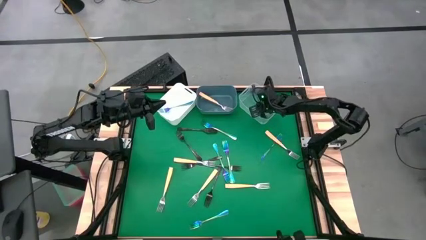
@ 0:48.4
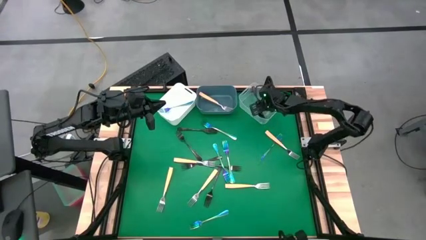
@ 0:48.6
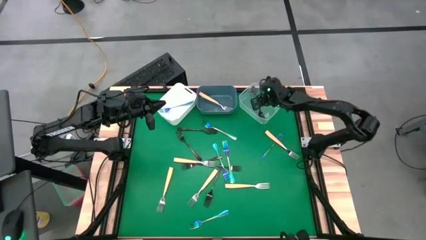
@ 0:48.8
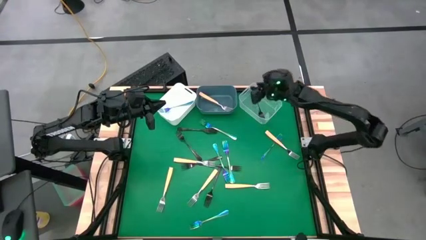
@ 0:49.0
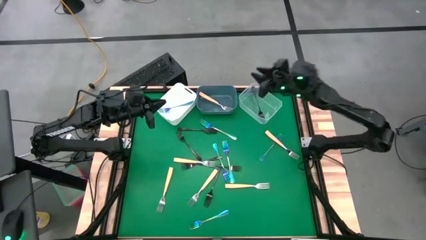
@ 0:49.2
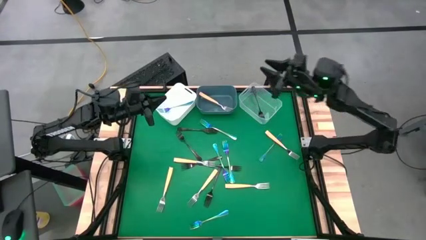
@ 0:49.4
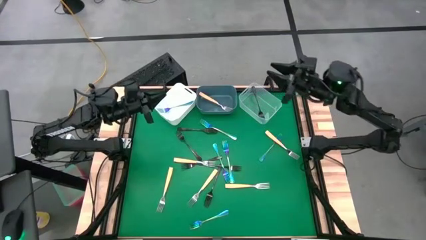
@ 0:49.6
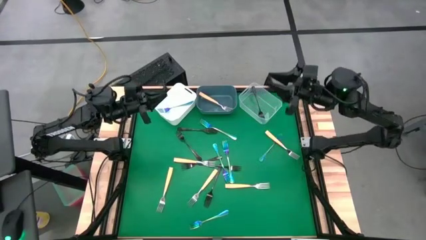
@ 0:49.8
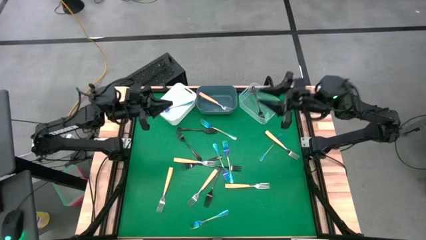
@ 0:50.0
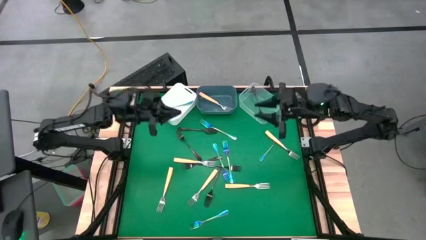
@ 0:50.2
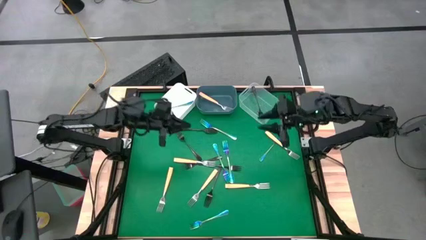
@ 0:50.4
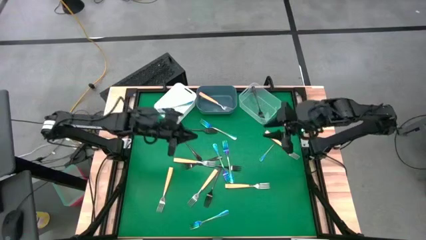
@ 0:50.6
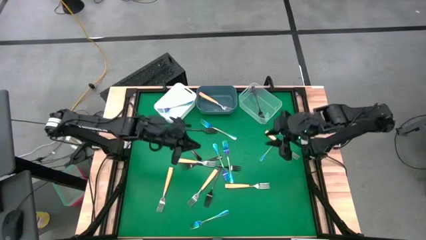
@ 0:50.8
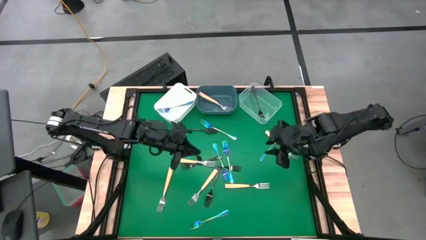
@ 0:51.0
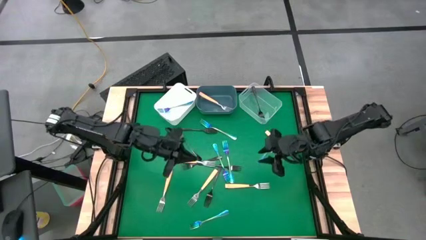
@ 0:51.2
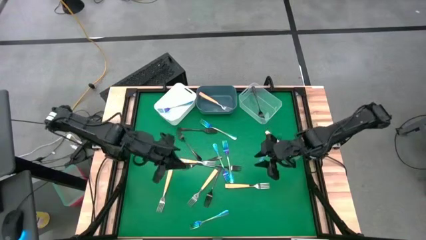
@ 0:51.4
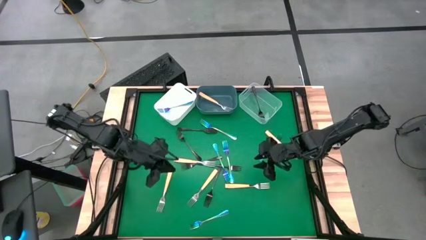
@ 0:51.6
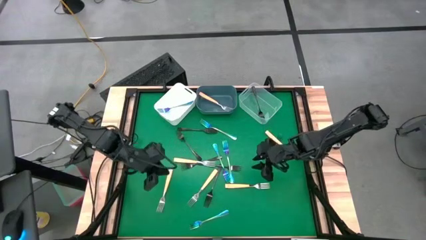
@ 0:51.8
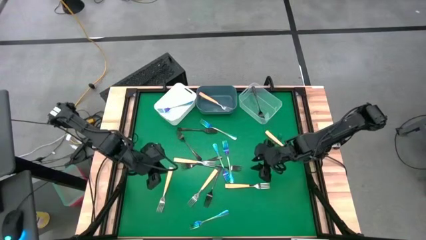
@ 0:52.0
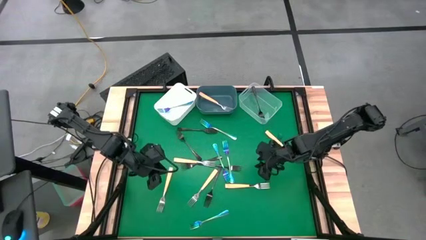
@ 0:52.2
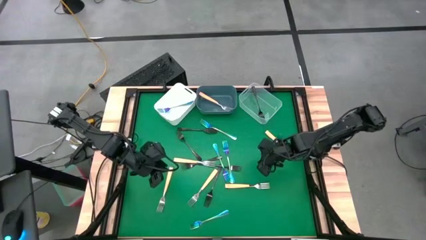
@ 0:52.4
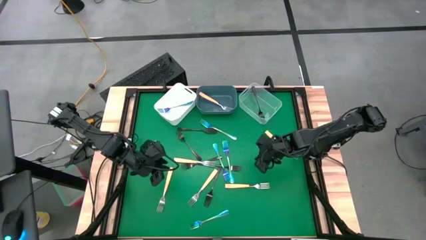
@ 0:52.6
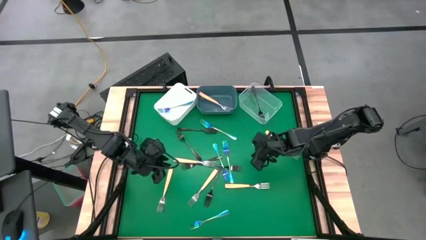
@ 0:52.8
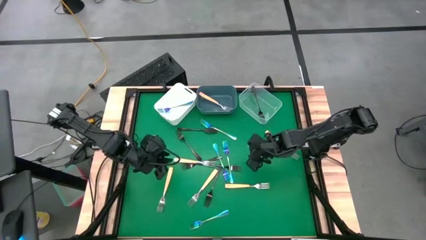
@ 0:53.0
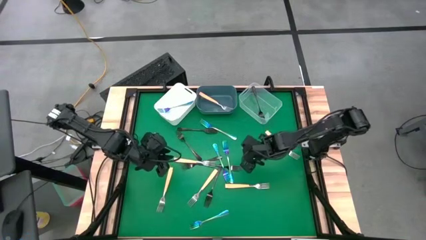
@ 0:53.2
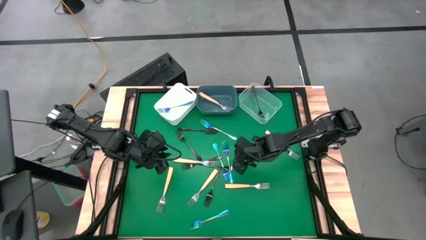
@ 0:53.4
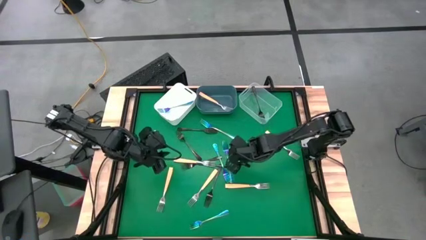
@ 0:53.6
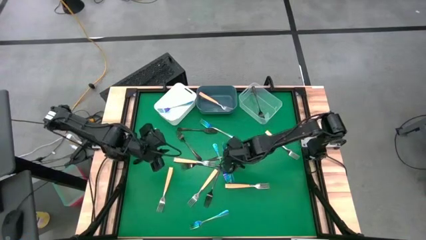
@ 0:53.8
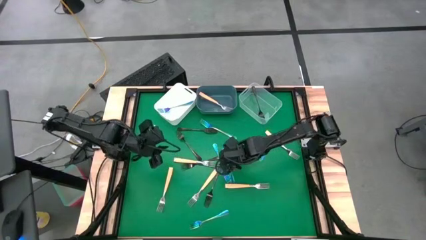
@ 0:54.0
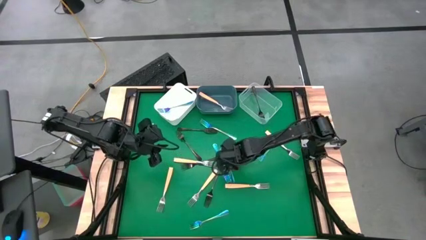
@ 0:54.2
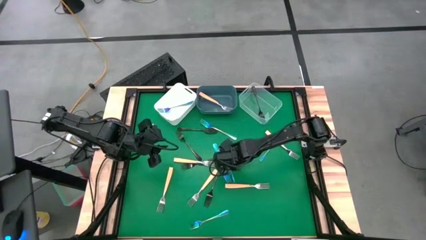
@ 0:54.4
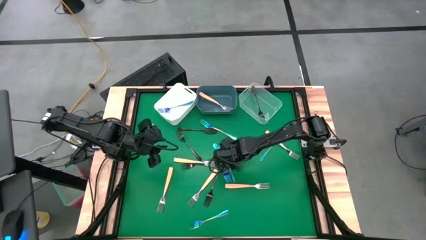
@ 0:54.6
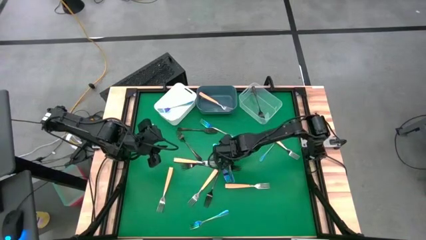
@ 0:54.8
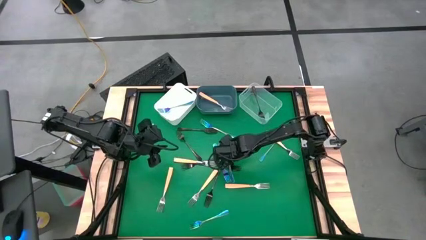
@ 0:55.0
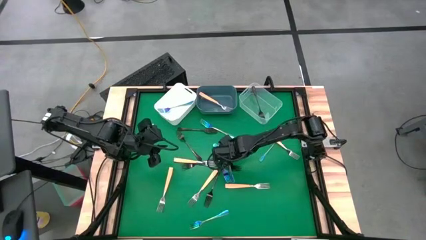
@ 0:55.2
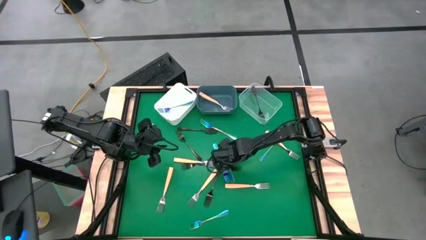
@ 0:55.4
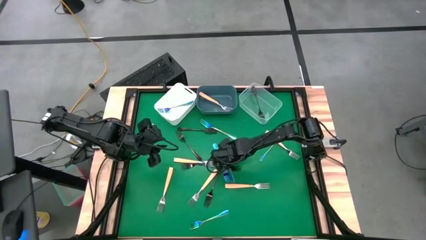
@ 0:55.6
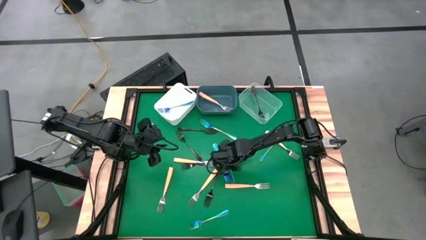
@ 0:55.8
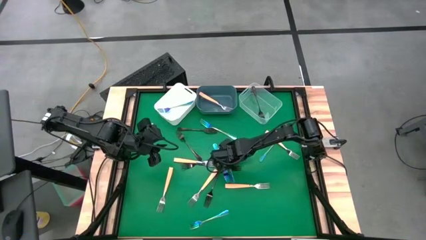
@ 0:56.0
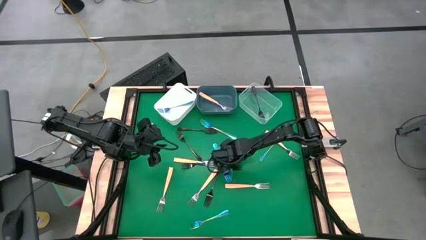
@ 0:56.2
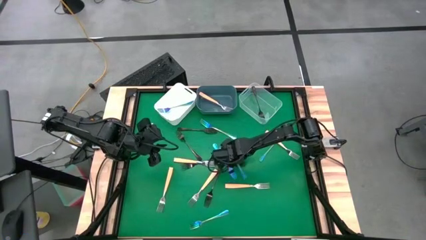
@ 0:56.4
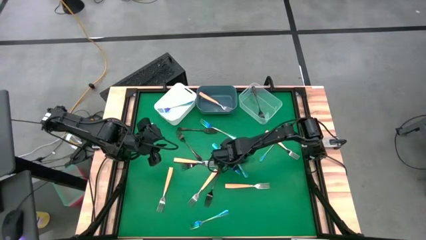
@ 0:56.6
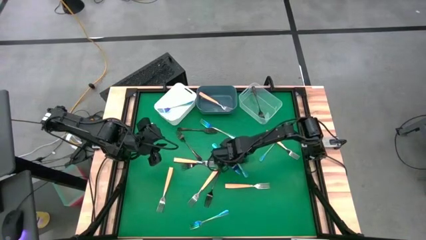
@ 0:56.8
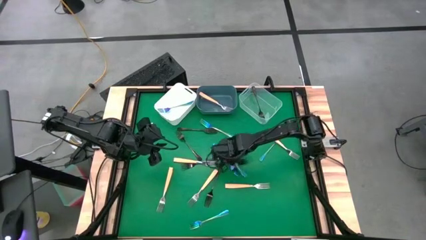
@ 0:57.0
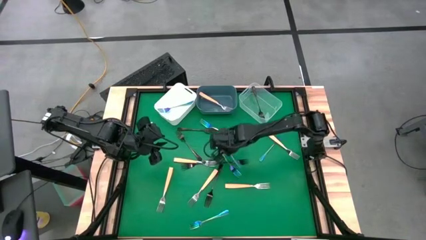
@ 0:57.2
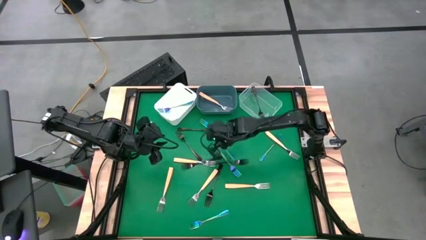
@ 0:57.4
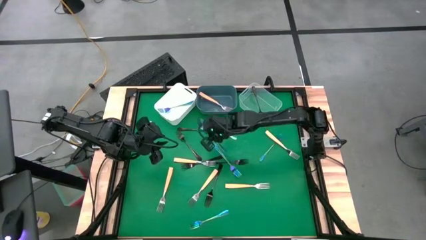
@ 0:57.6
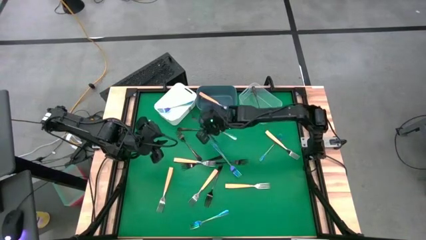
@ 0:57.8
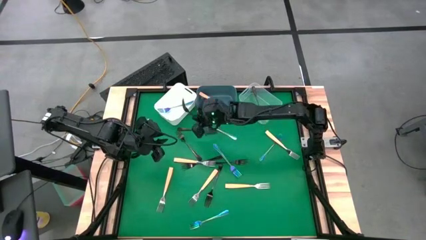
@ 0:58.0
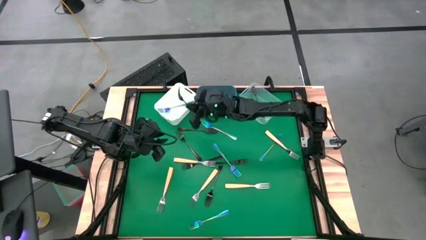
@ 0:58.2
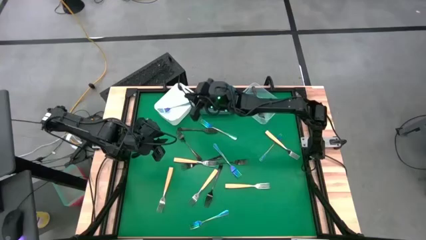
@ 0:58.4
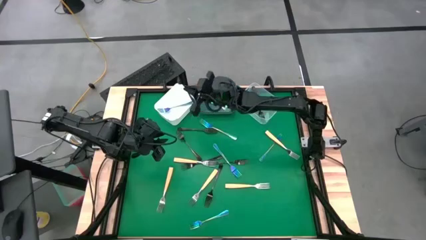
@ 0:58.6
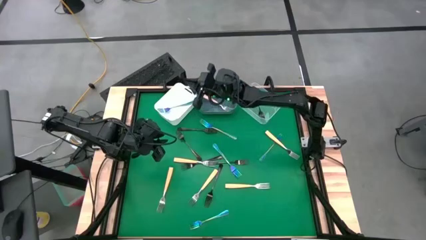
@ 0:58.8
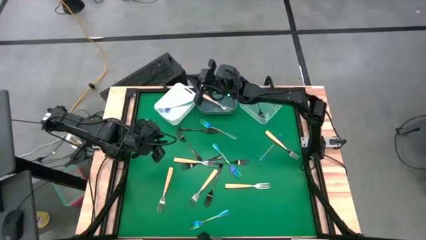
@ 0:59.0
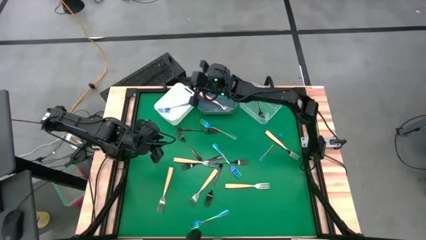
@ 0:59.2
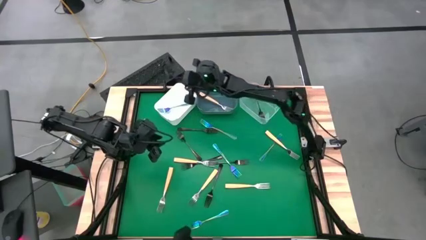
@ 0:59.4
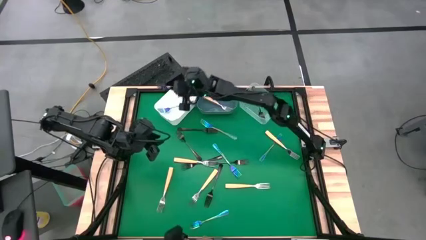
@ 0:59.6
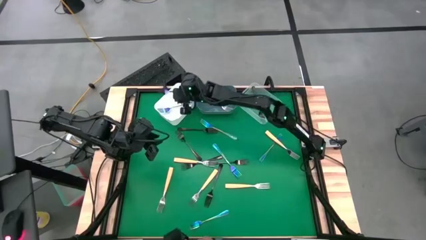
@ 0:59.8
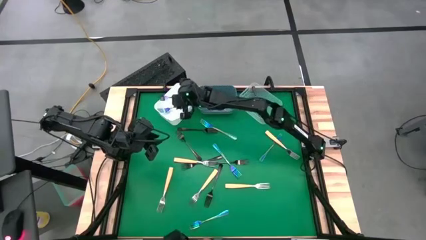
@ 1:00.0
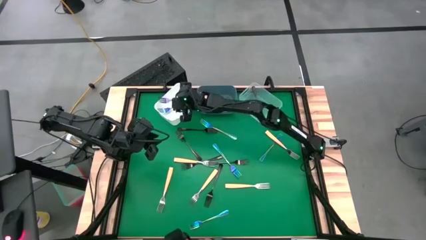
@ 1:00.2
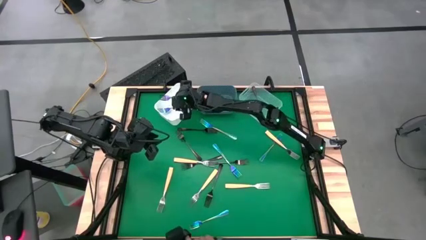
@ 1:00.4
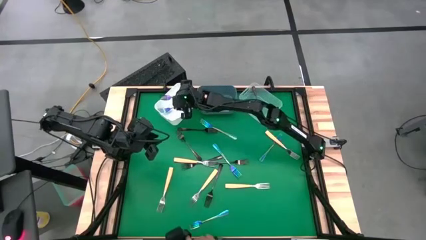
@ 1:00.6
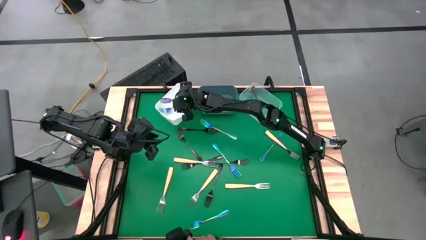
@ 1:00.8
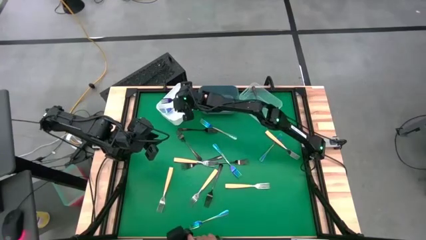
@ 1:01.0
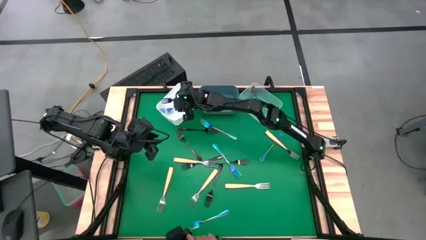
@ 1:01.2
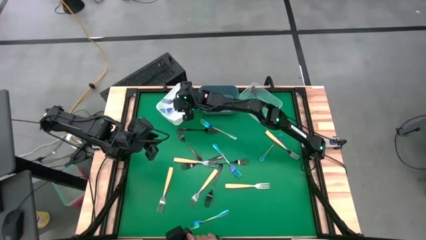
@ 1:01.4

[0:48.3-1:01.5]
Task: Sort silverware by color (type)
Put the blue fork into the white bin
